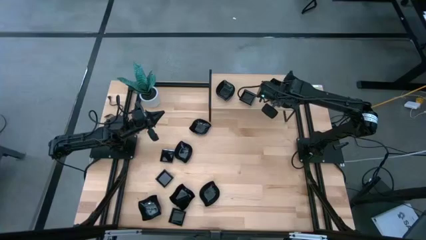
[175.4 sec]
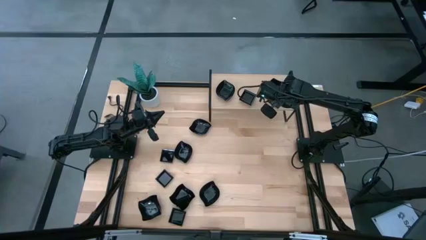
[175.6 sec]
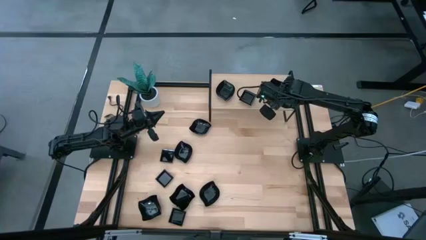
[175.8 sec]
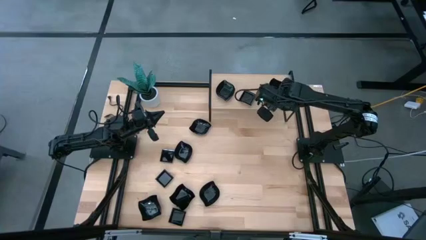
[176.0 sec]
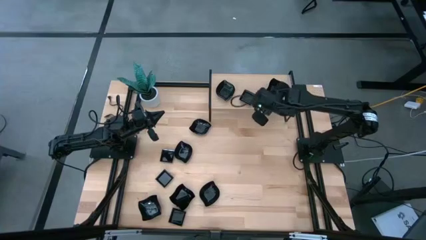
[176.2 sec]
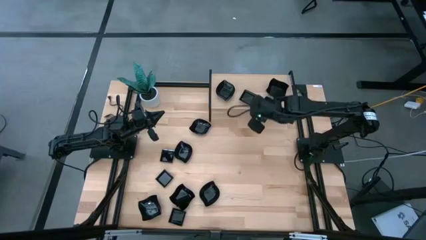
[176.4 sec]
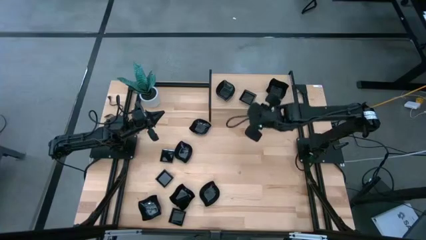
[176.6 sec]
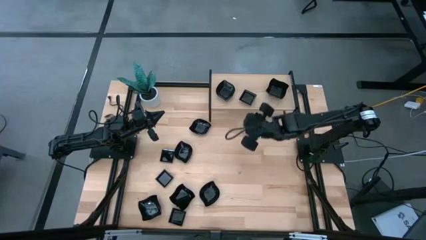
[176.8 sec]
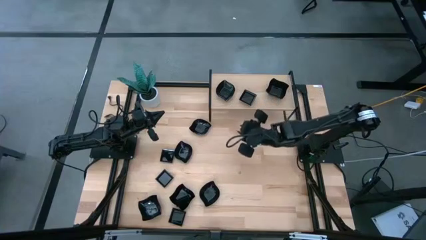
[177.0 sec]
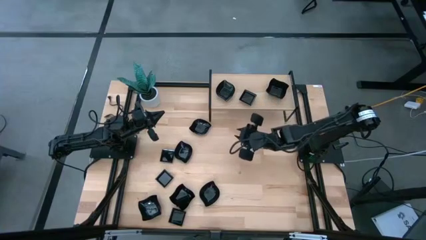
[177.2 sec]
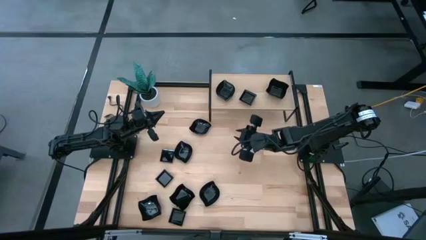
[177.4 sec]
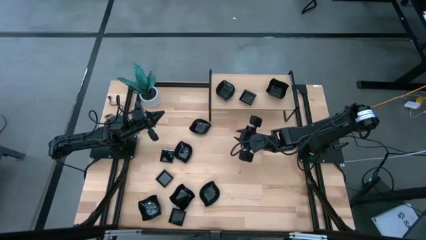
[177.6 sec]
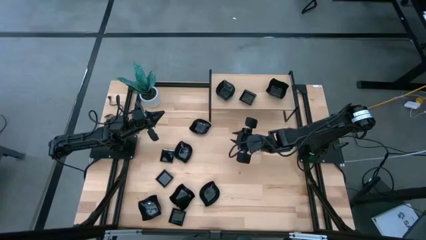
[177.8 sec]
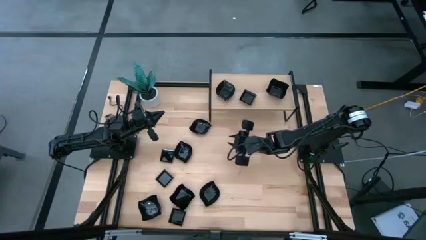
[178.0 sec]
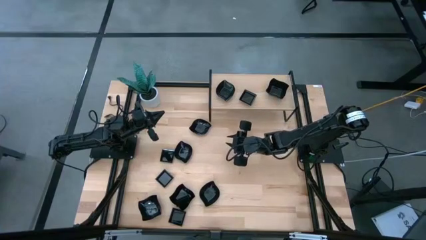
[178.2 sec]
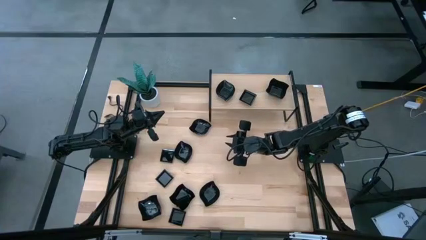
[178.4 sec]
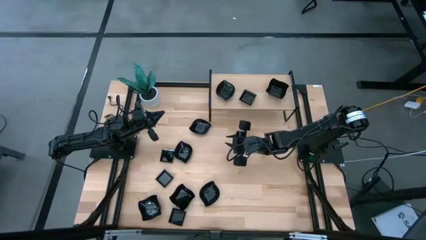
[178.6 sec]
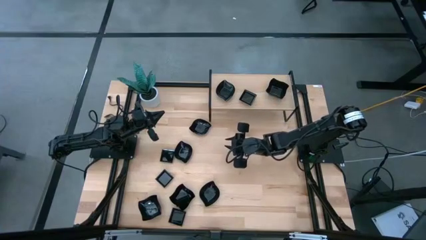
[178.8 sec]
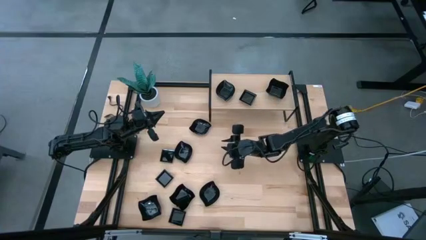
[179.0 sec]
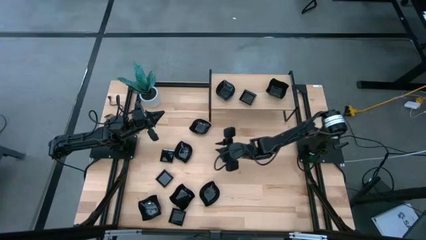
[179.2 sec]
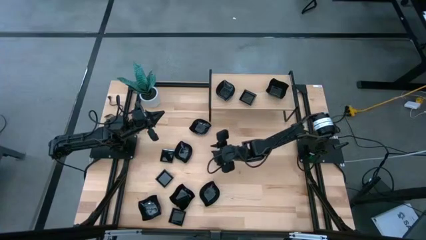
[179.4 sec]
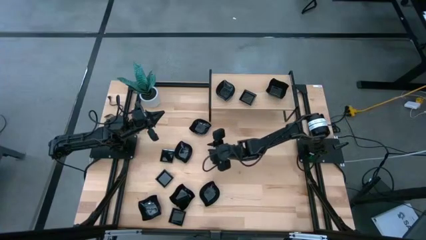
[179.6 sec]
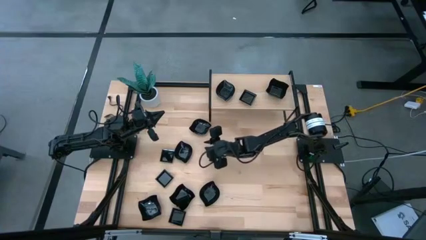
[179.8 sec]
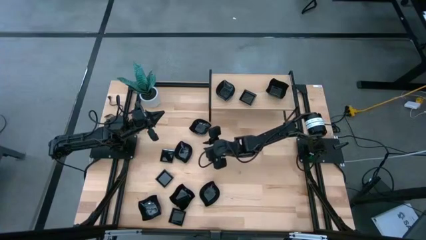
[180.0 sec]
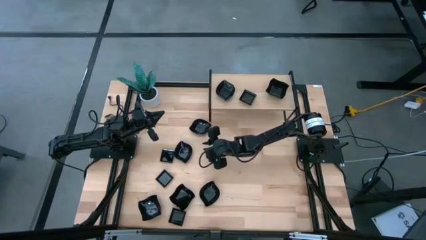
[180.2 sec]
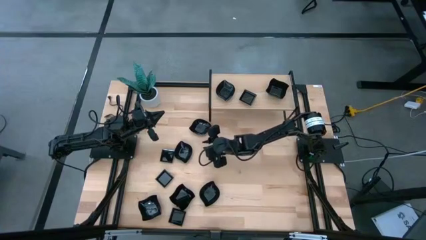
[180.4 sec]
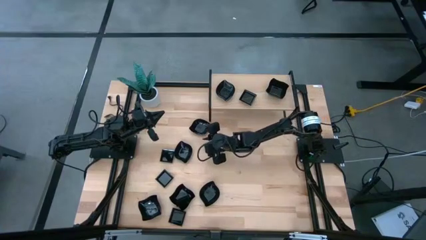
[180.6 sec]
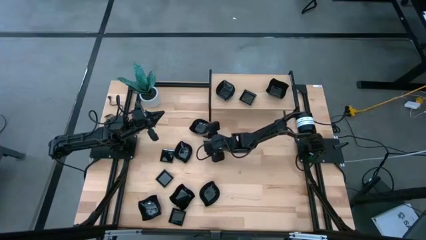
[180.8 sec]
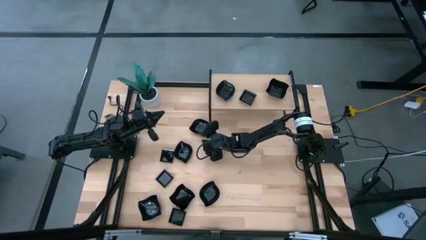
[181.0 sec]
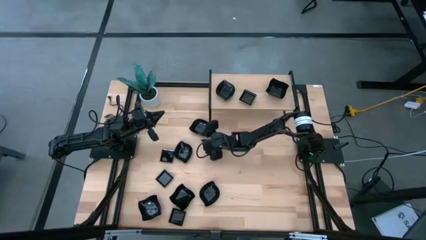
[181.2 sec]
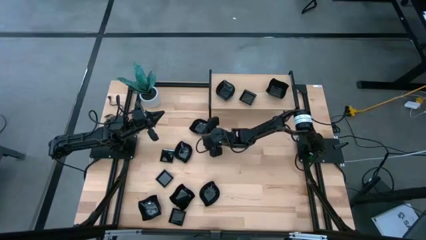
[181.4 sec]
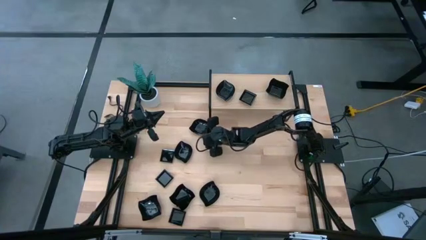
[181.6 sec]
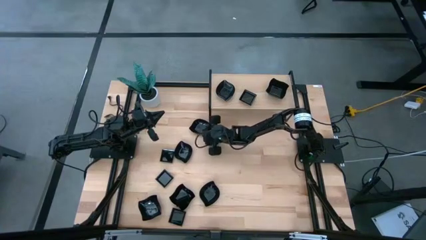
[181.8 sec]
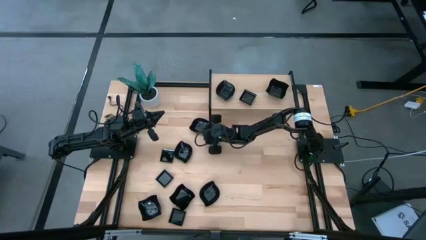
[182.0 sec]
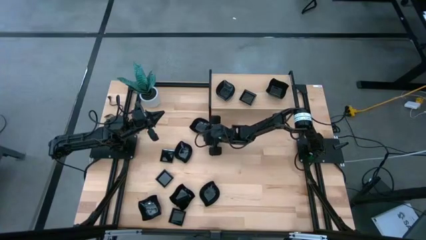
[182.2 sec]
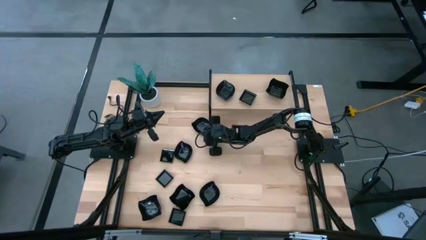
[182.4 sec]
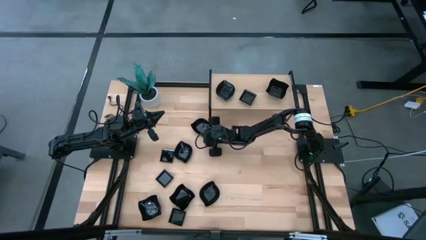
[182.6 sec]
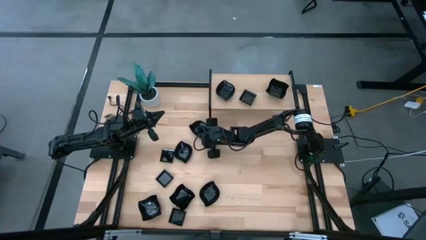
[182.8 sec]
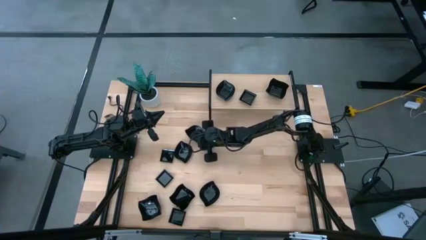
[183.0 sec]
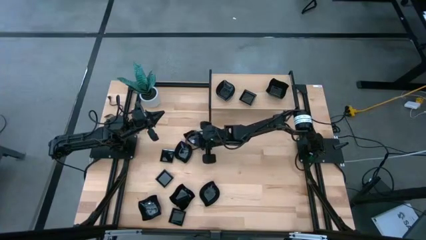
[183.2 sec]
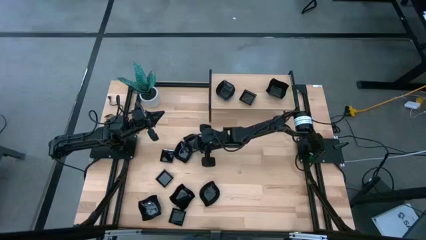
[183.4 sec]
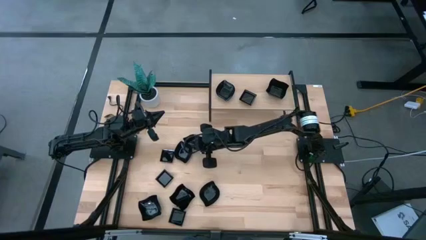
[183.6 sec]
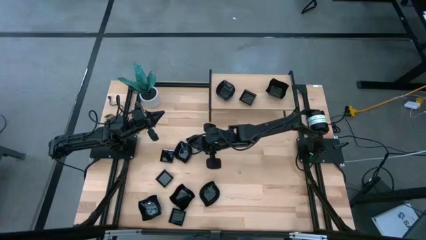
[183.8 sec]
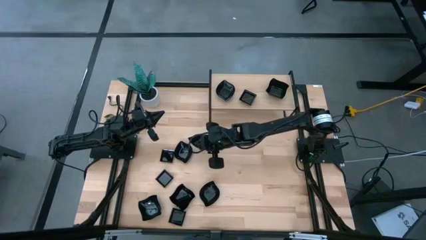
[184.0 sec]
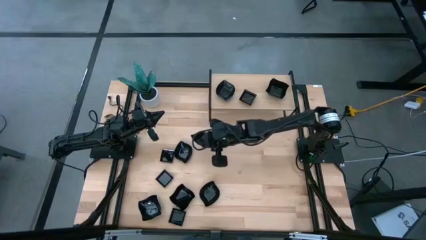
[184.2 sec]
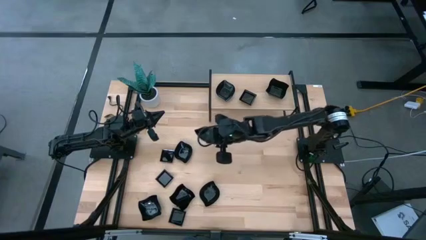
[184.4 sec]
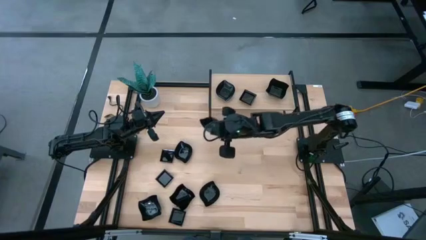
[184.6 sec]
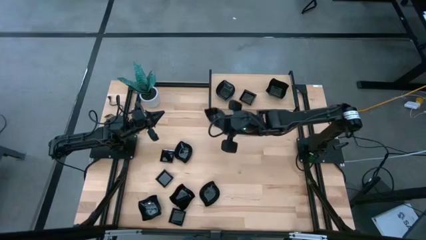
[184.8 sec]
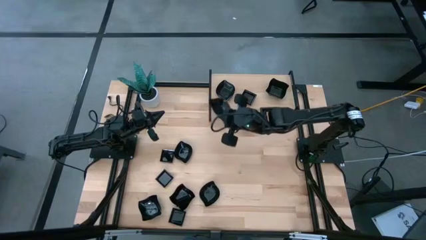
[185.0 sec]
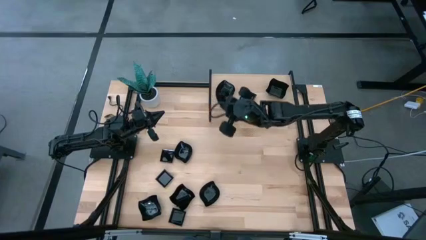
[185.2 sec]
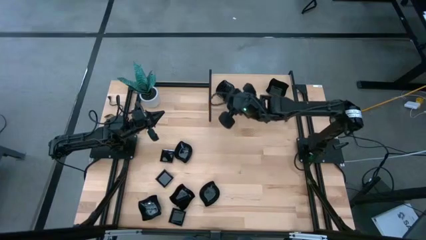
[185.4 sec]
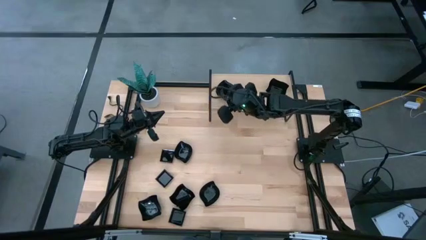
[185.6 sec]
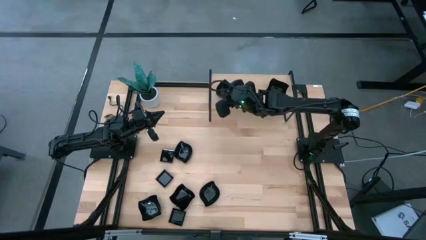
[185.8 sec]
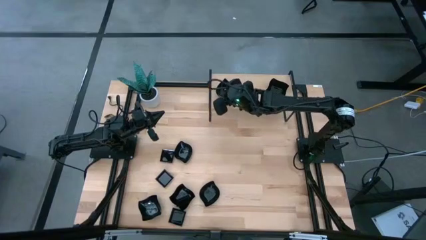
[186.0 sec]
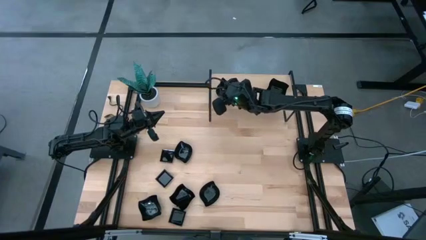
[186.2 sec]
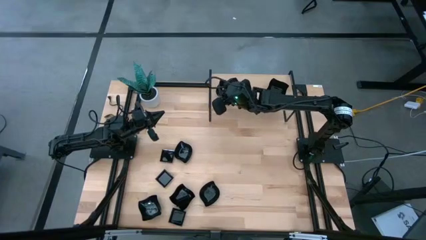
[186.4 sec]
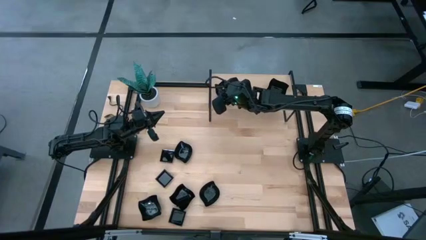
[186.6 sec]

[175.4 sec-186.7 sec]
Task: Pick & Place Mini shaped plates
Stack the black leaf-shaped plate on top of the black leaf-shaped plate on the shelf

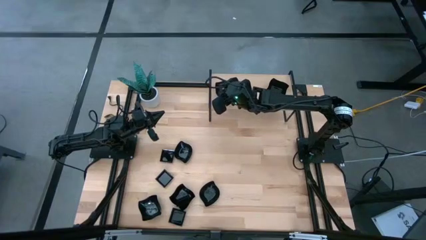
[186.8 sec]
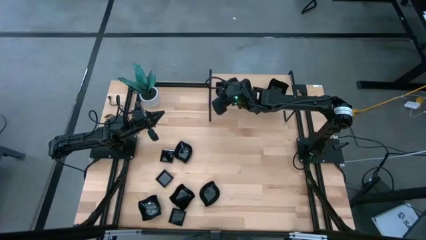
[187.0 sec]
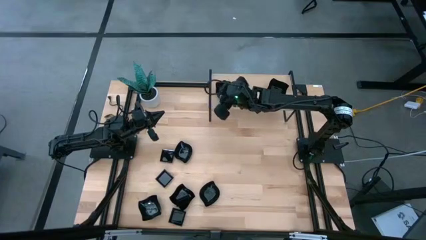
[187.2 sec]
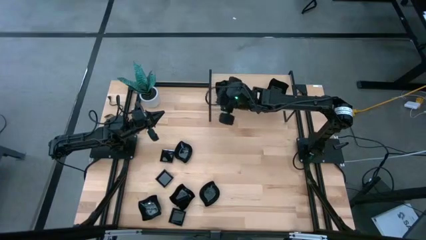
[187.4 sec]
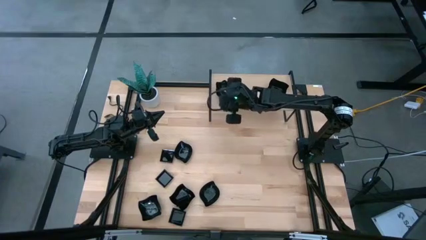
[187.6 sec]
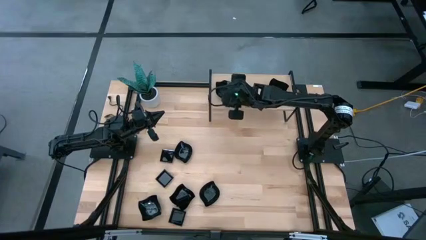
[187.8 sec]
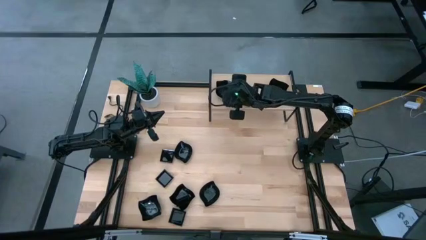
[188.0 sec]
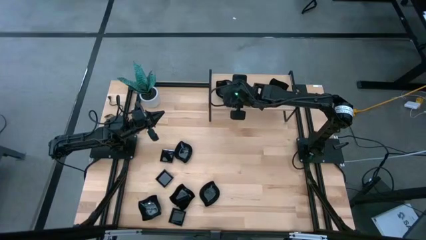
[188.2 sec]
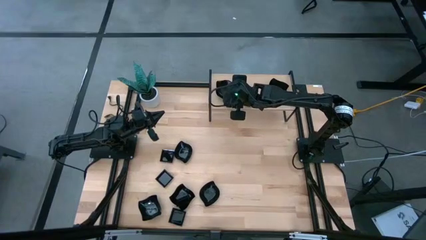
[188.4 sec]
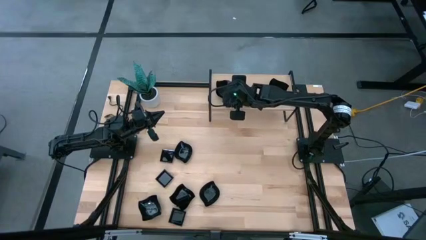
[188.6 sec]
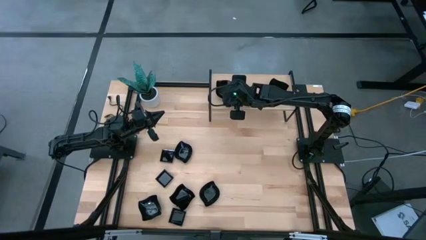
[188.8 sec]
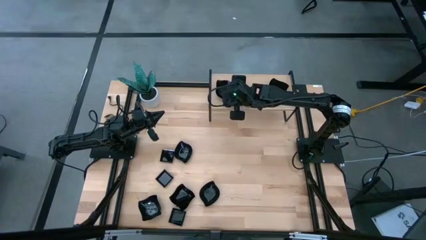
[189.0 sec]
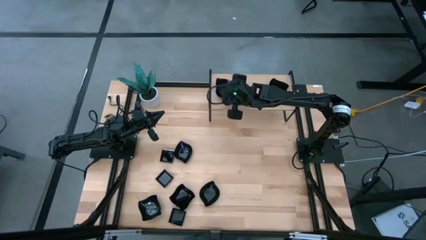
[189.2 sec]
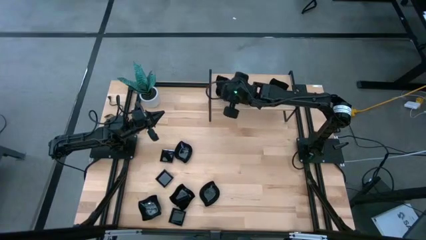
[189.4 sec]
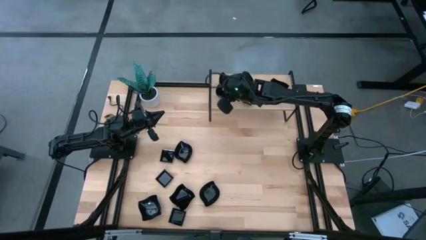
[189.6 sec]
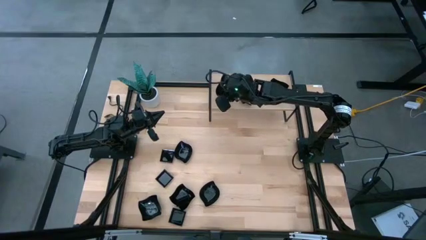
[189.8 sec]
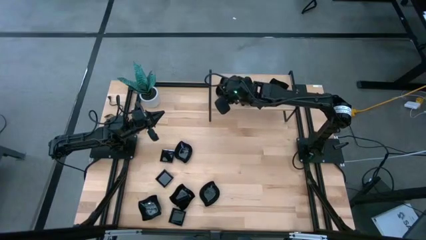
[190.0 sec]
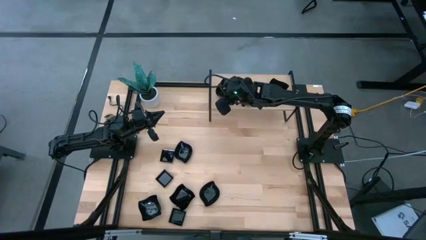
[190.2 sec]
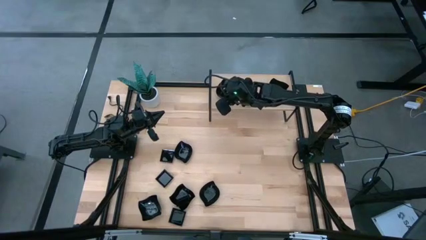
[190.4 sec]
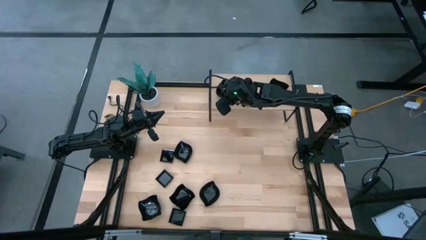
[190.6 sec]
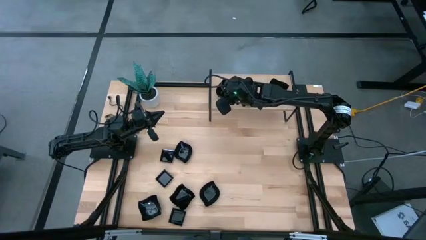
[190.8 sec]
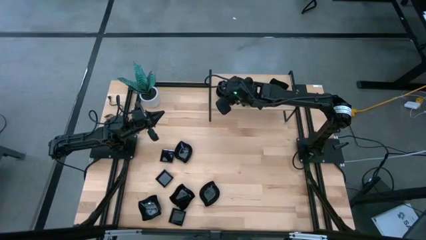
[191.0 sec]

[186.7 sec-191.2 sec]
Stack the black leaf-shaped plate on top of the black leaf-shaped plate on the shelf
